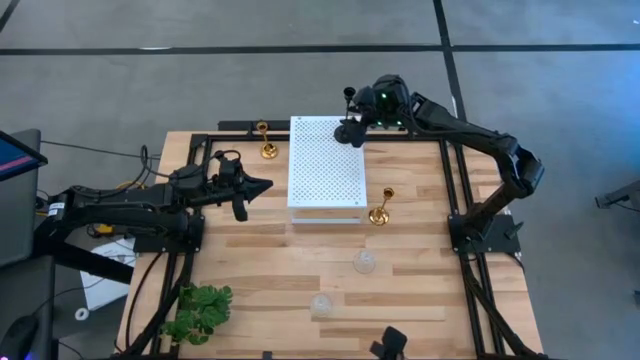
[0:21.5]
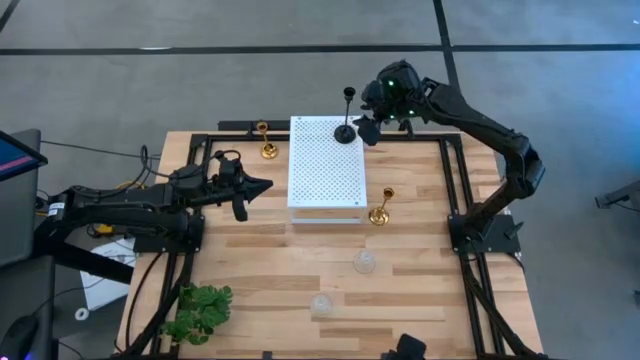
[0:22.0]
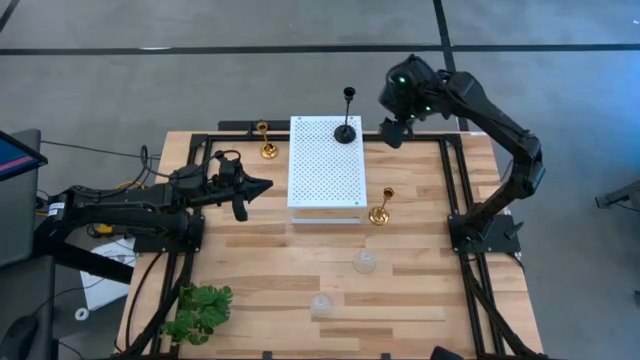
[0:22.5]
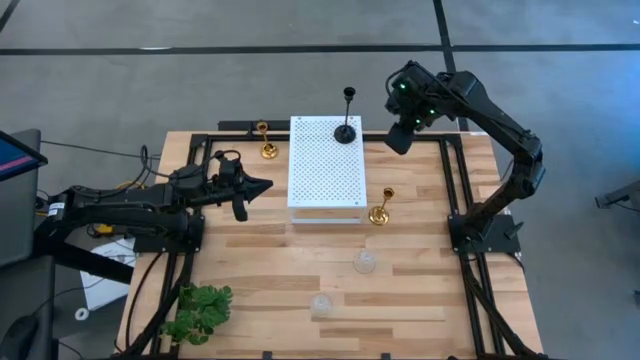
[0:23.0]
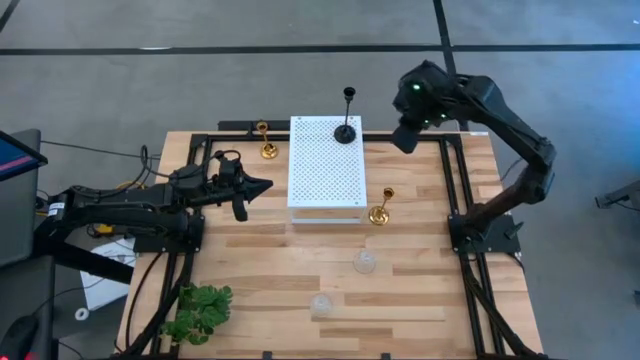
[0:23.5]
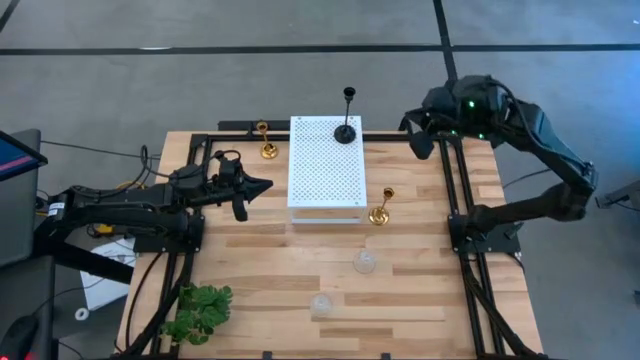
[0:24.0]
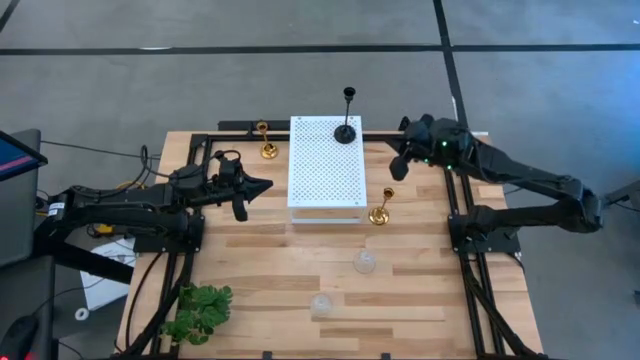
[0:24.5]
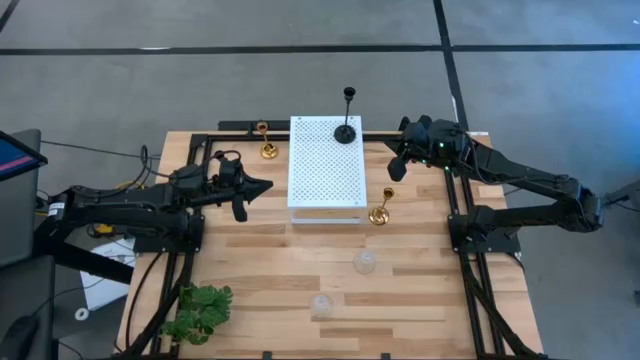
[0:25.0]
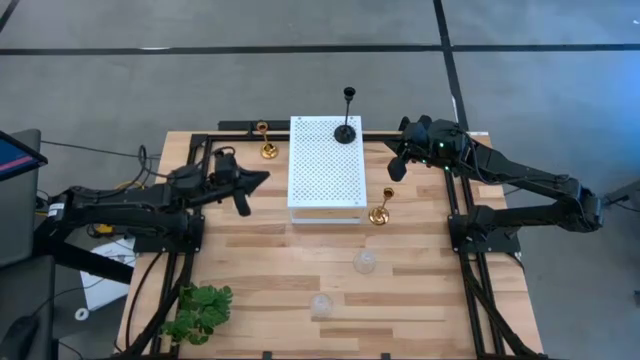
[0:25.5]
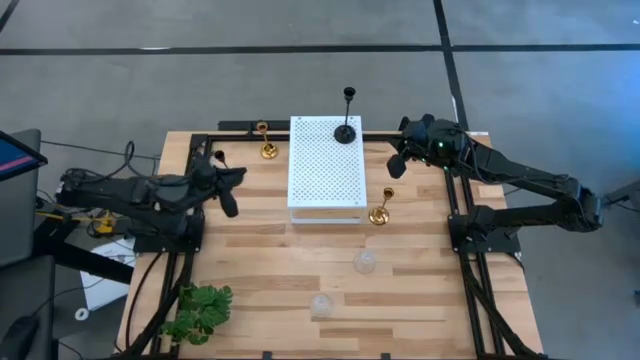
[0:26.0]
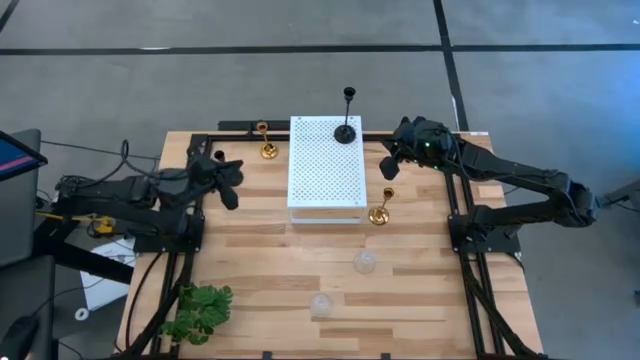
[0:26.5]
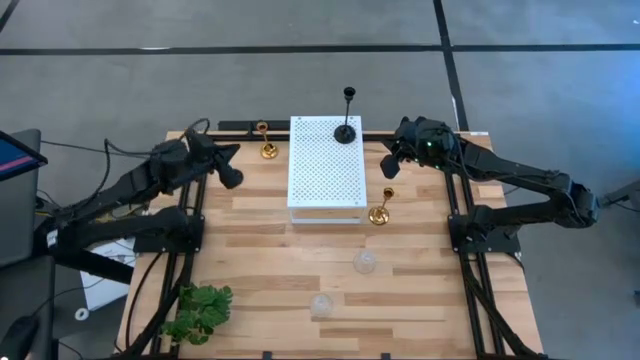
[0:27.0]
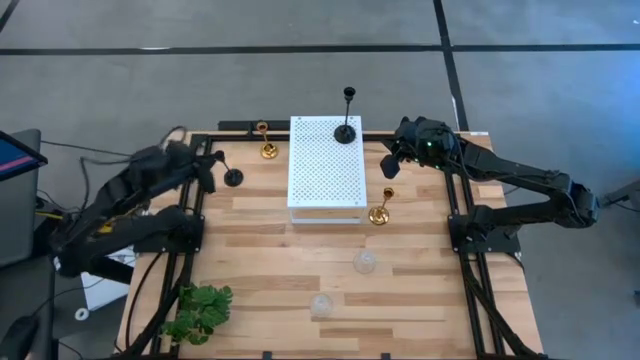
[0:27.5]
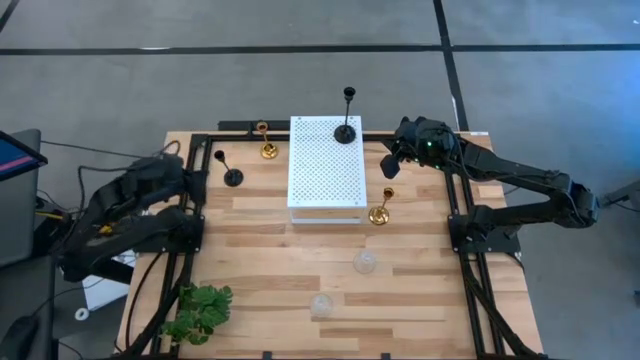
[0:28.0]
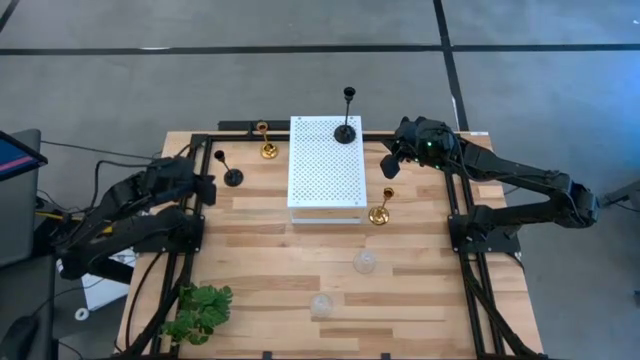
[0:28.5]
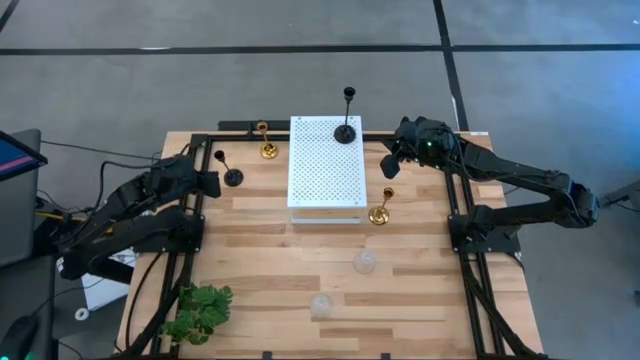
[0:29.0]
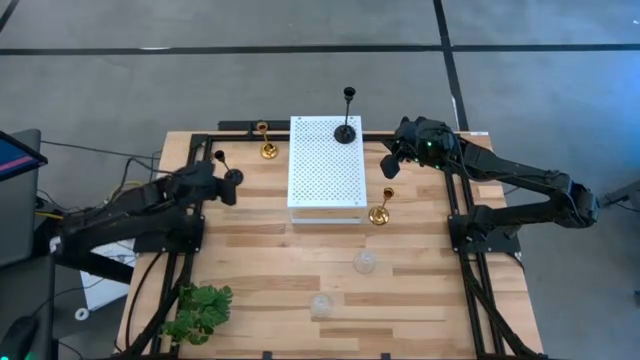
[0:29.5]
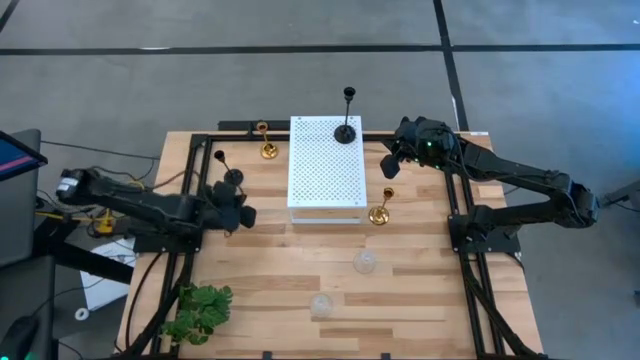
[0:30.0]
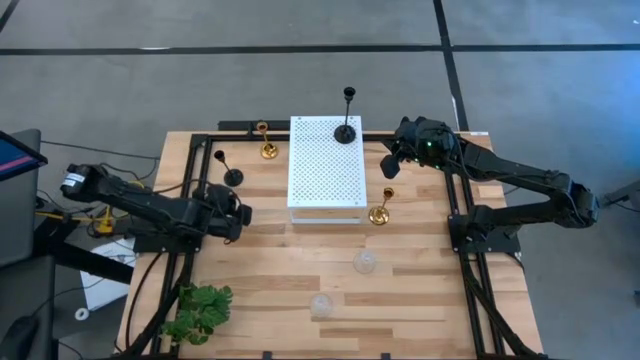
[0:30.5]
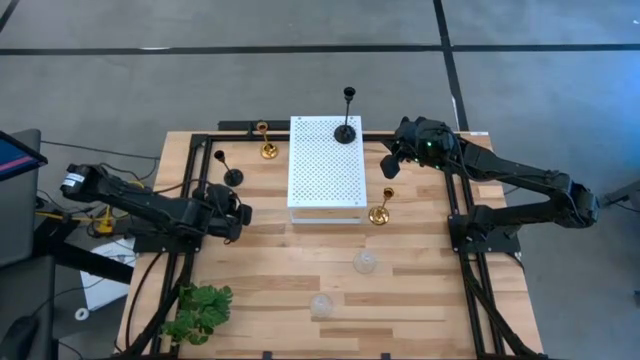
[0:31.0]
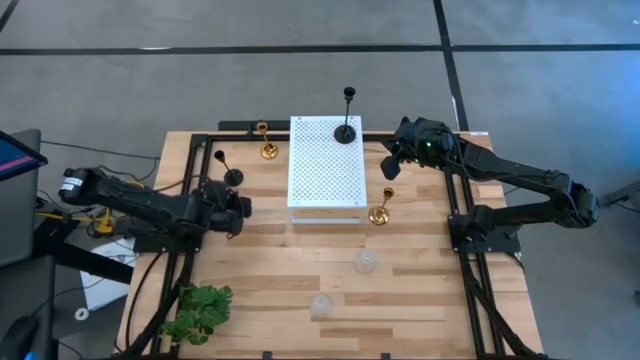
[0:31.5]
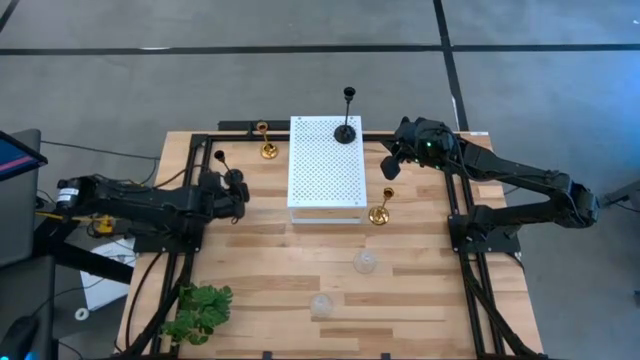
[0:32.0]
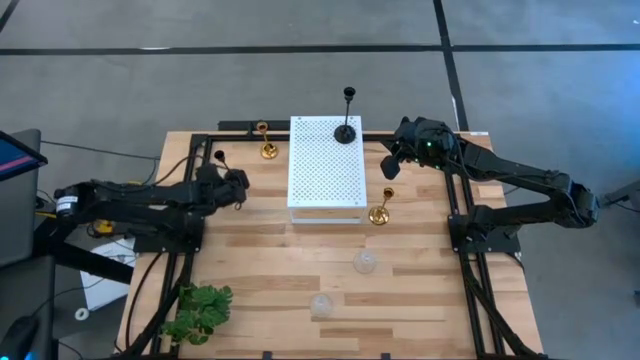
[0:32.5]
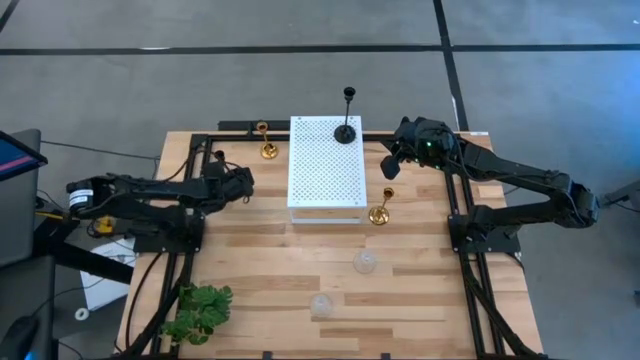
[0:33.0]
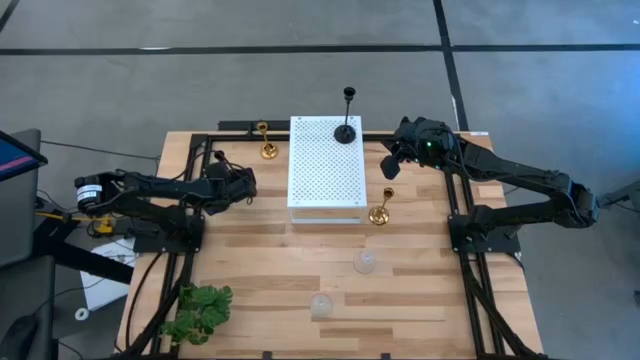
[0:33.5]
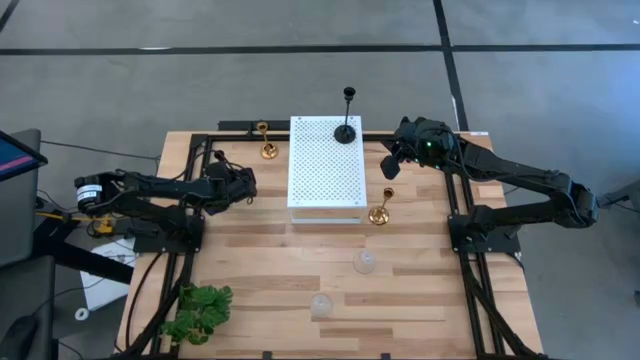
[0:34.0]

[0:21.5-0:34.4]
Task: Pick & Place candle stick holders
Put the black candle holder on the shelf

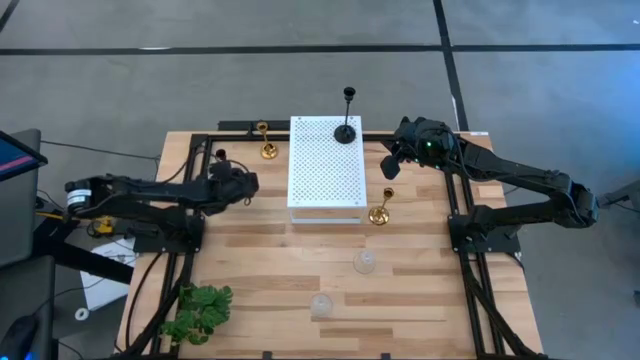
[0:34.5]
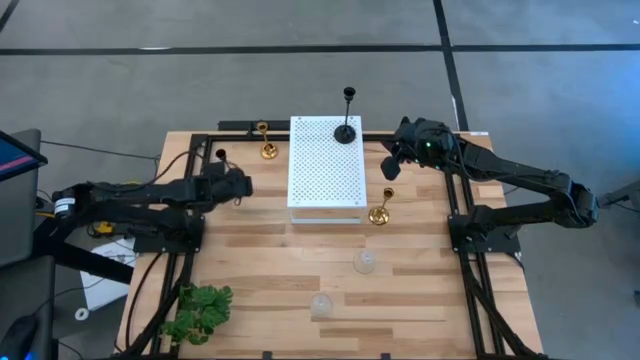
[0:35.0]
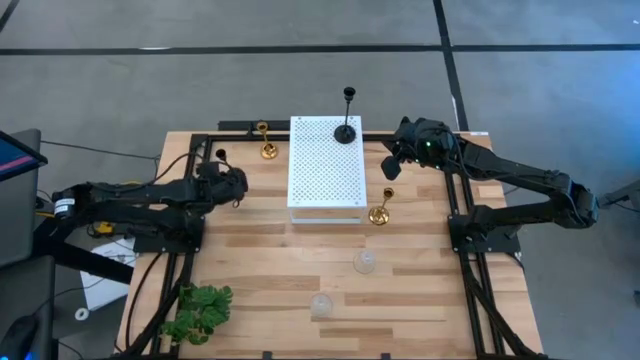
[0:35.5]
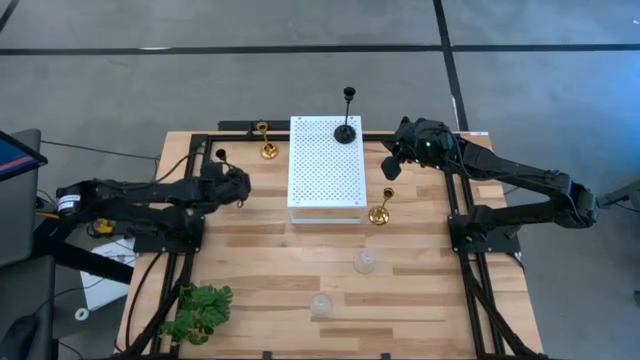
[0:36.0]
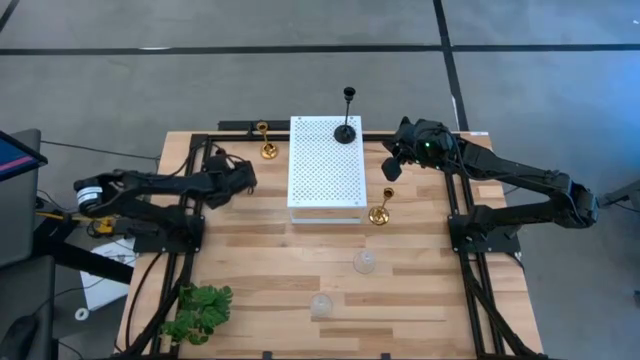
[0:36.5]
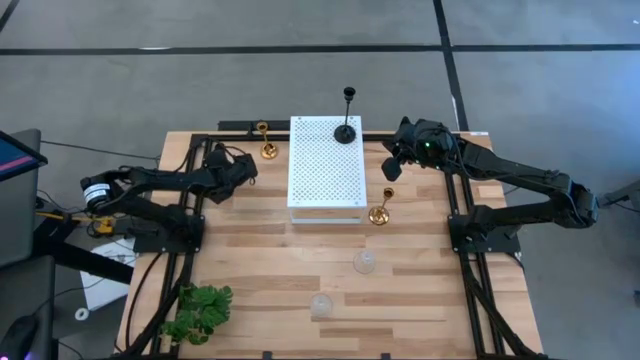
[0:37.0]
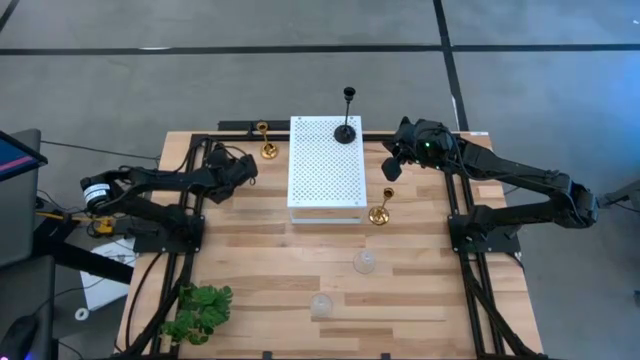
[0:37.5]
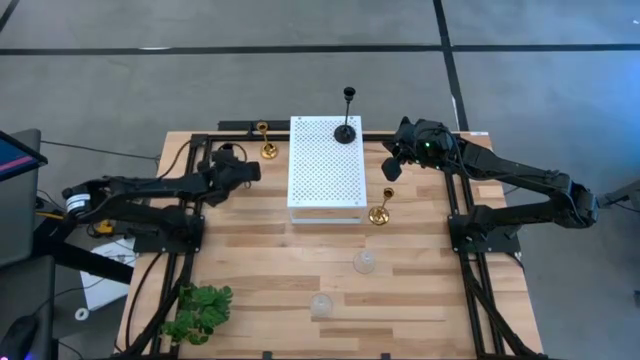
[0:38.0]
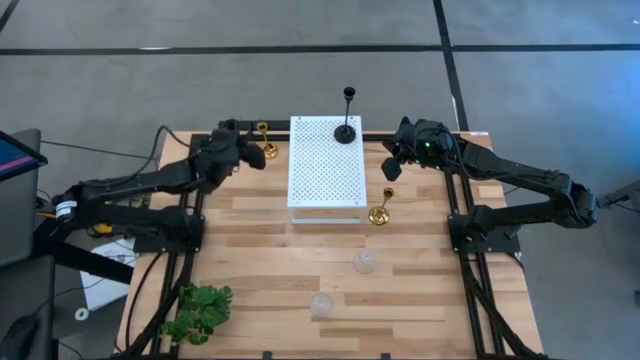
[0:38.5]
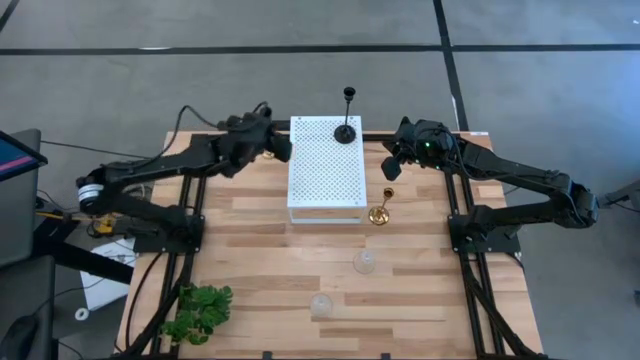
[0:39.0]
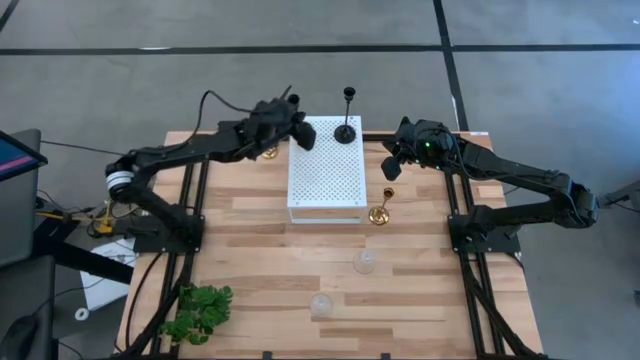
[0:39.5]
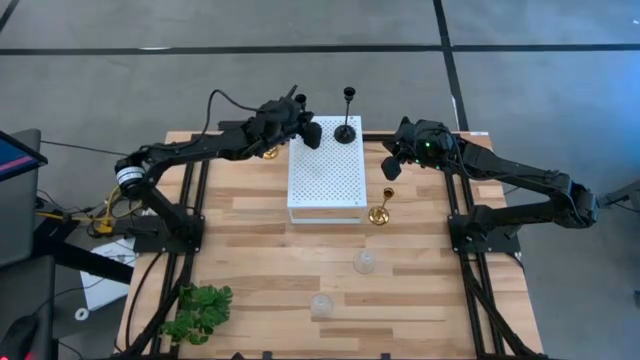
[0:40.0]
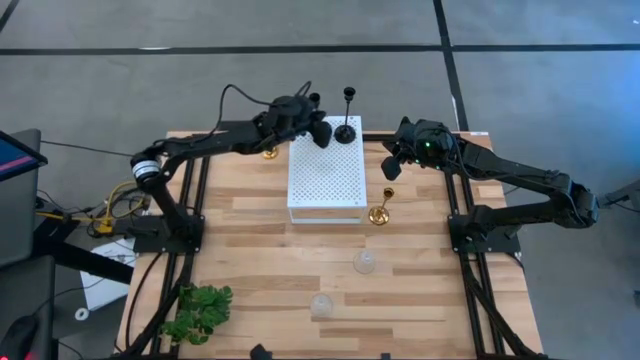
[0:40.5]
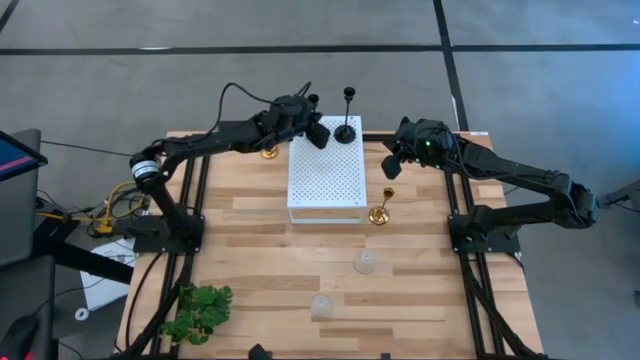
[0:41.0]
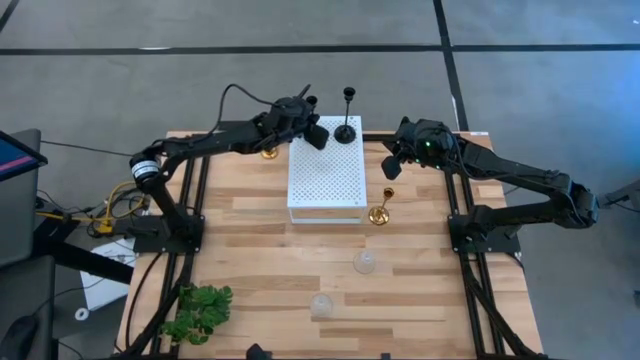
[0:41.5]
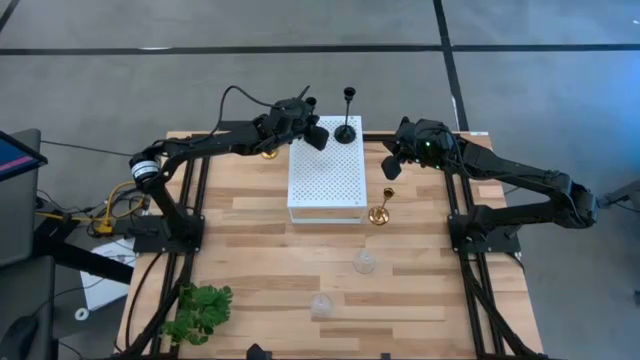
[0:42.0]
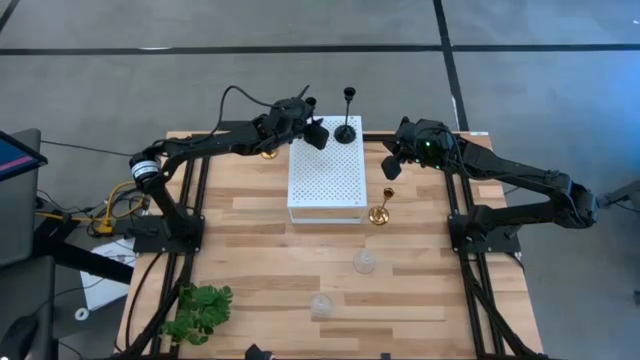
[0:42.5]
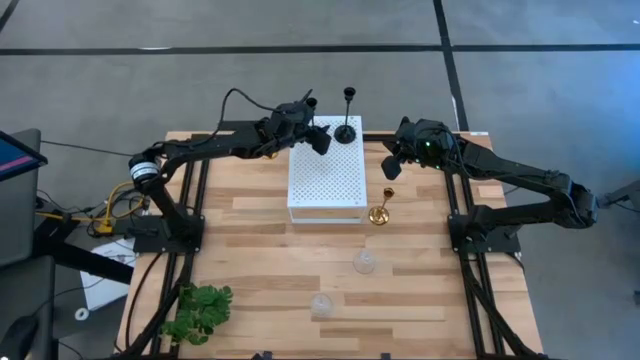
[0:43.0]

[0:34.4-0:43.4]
Put the black candle holder on the shelf
